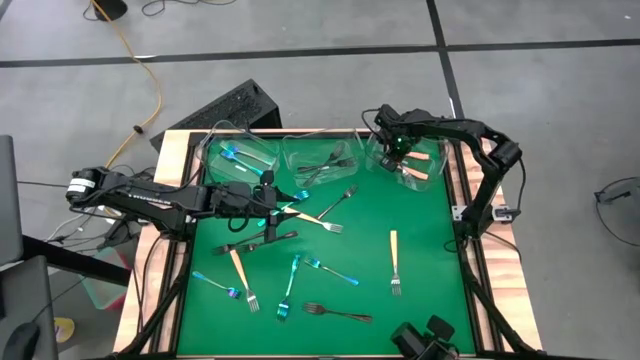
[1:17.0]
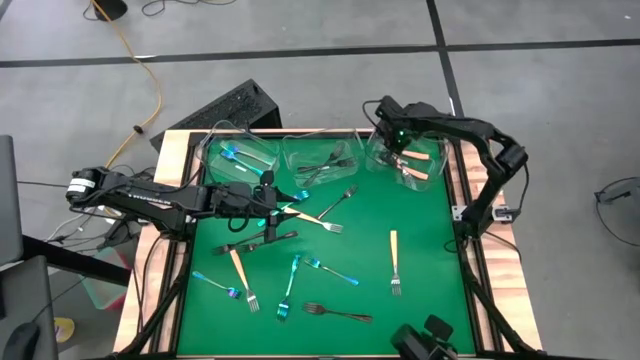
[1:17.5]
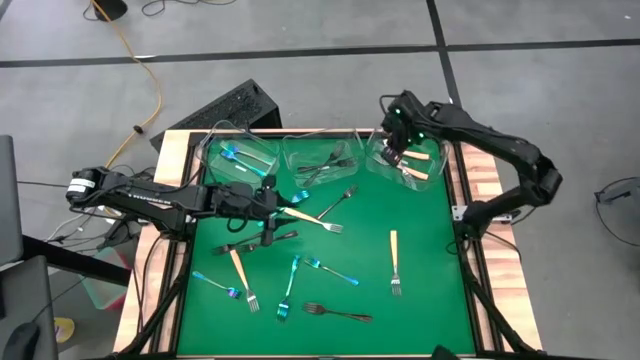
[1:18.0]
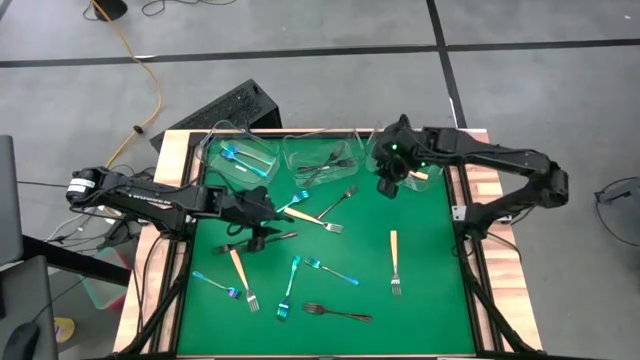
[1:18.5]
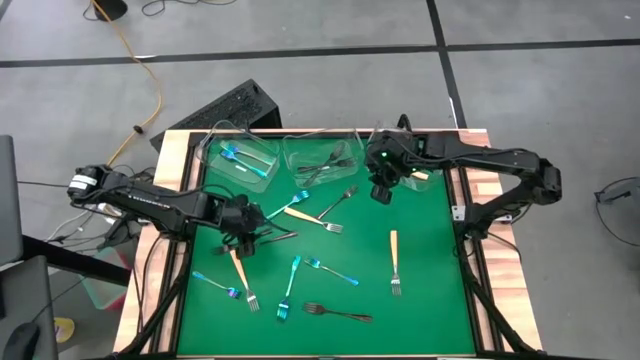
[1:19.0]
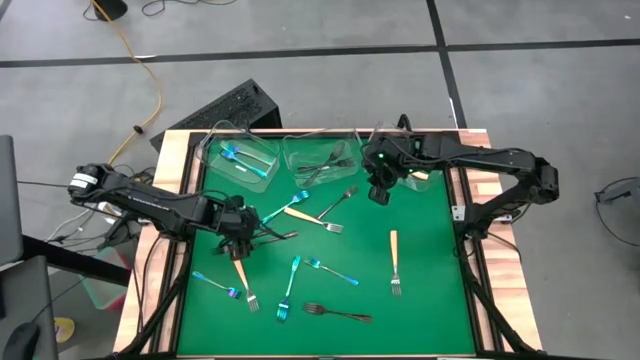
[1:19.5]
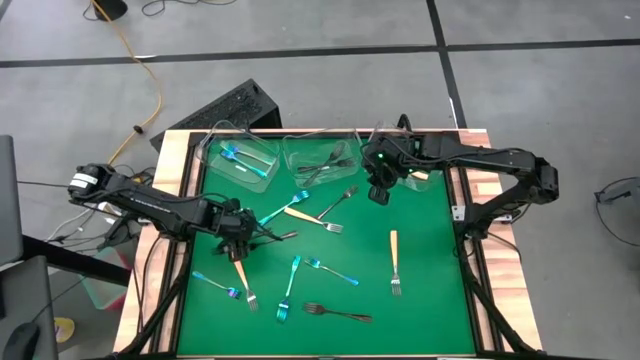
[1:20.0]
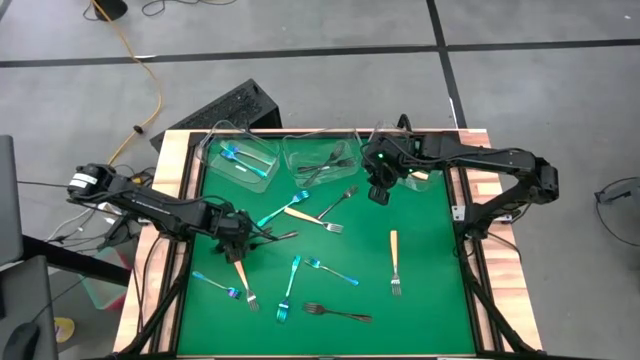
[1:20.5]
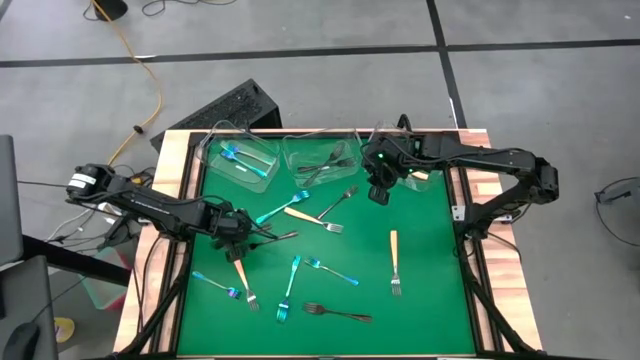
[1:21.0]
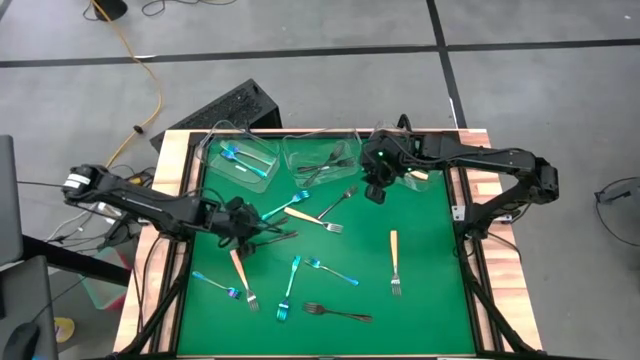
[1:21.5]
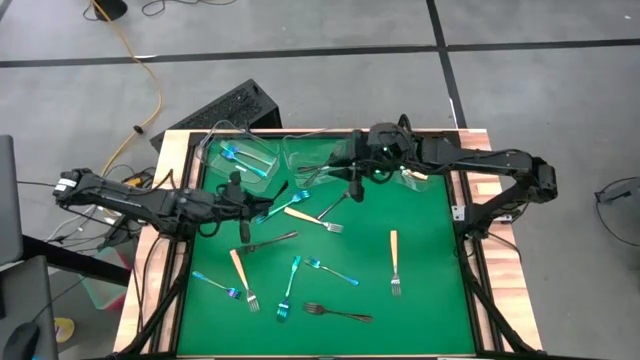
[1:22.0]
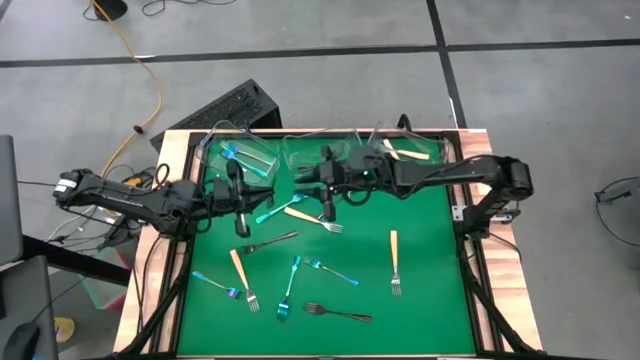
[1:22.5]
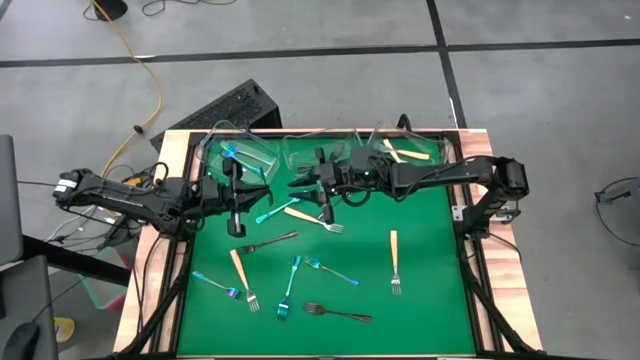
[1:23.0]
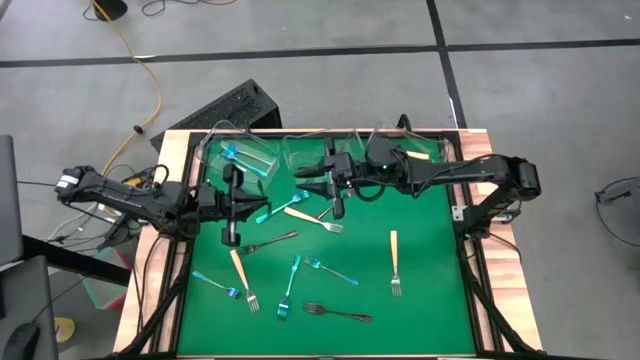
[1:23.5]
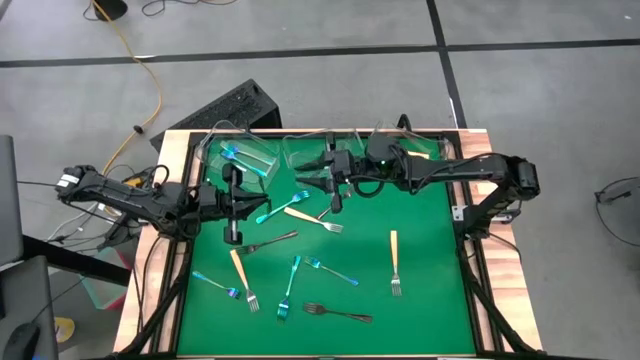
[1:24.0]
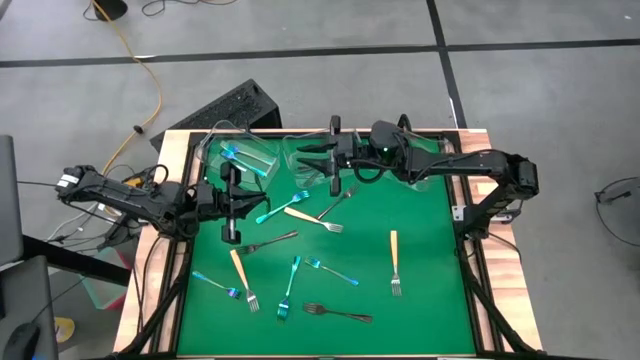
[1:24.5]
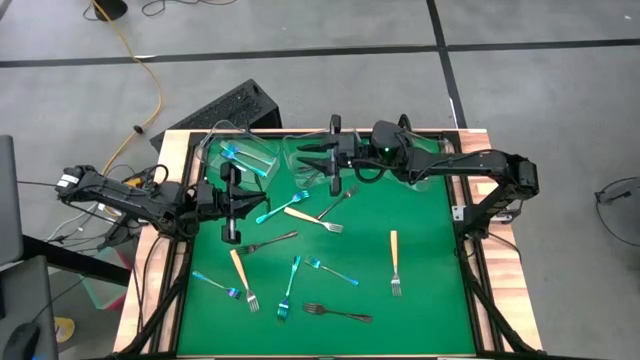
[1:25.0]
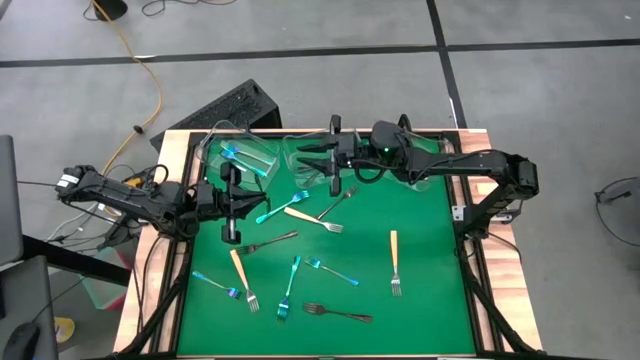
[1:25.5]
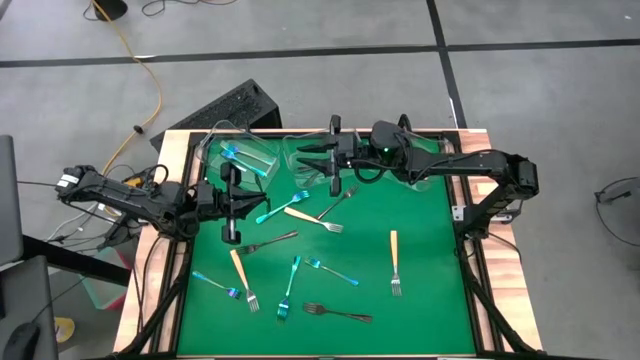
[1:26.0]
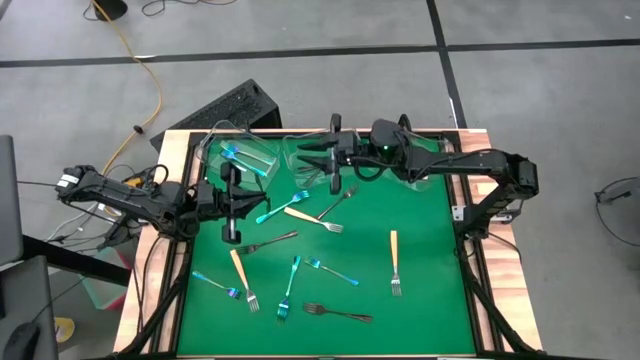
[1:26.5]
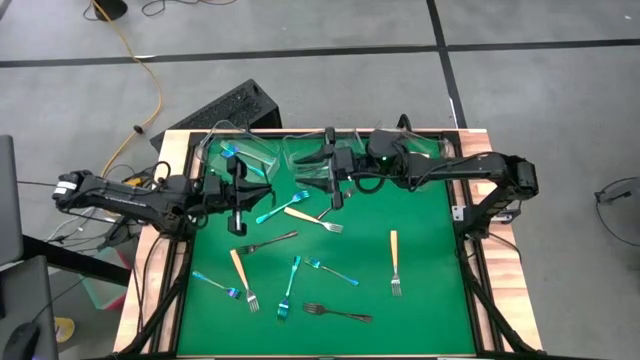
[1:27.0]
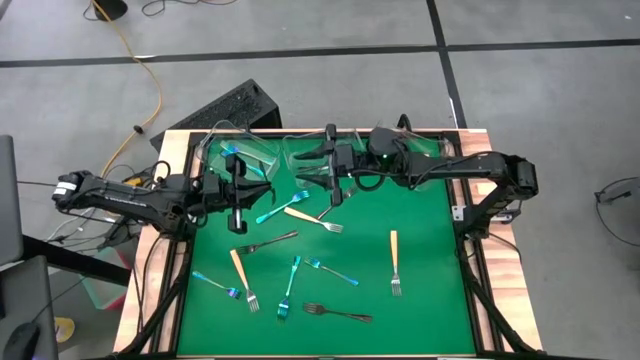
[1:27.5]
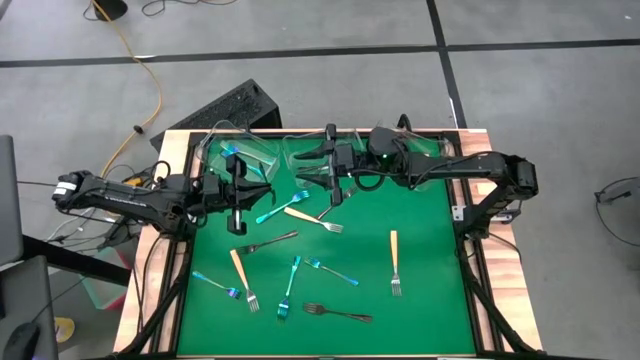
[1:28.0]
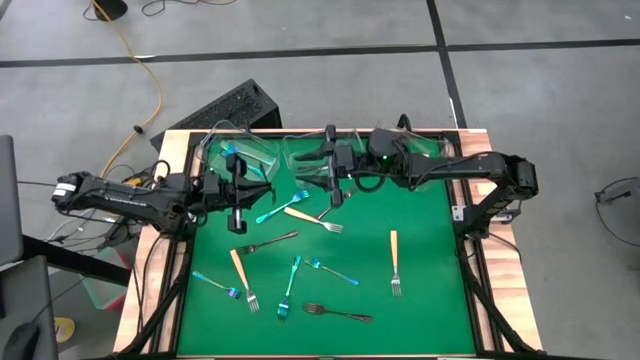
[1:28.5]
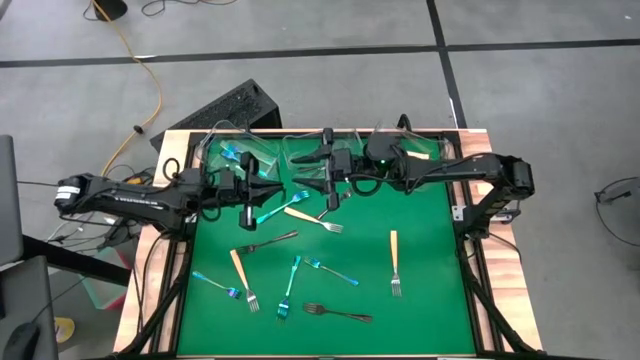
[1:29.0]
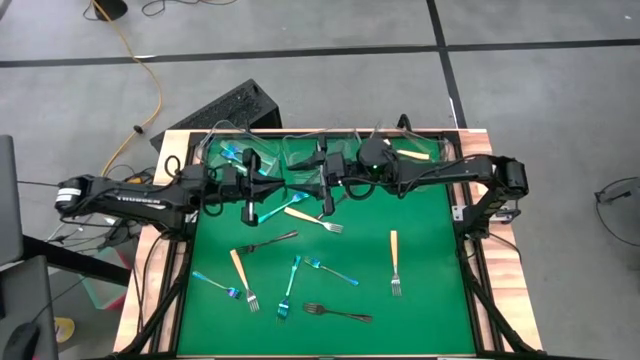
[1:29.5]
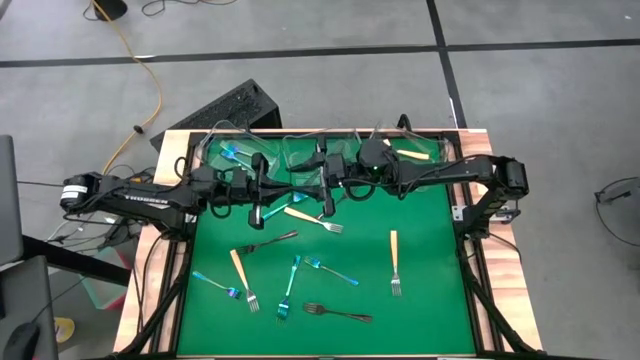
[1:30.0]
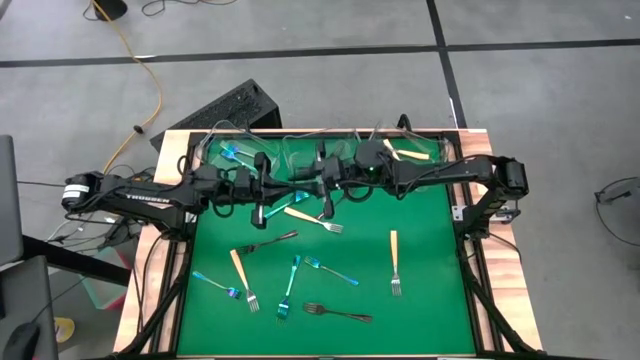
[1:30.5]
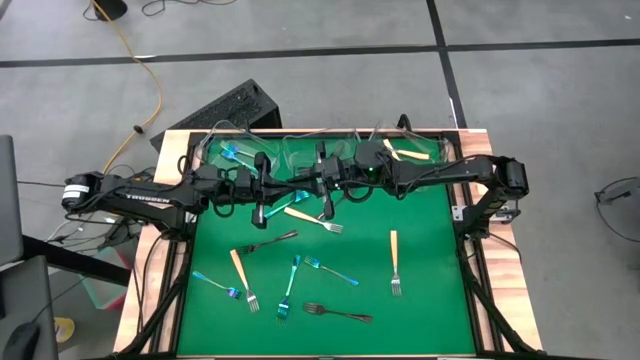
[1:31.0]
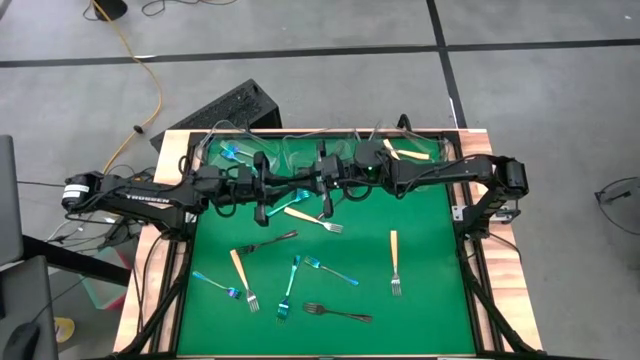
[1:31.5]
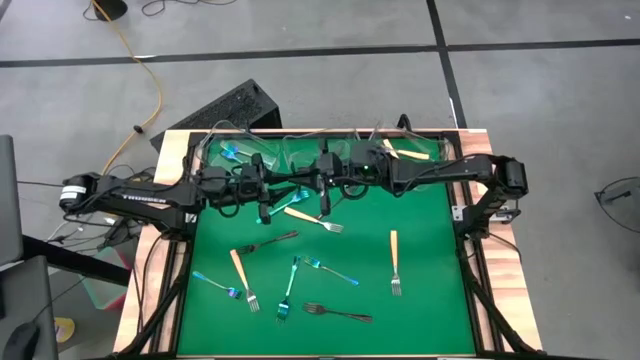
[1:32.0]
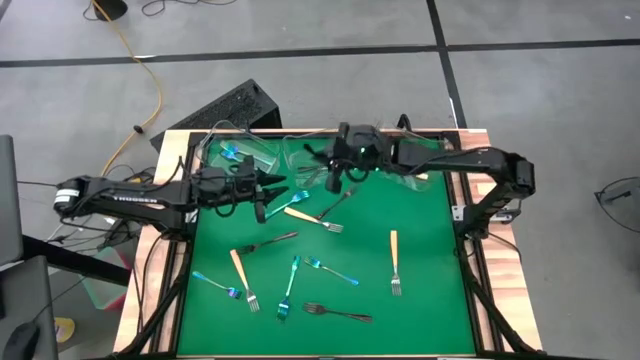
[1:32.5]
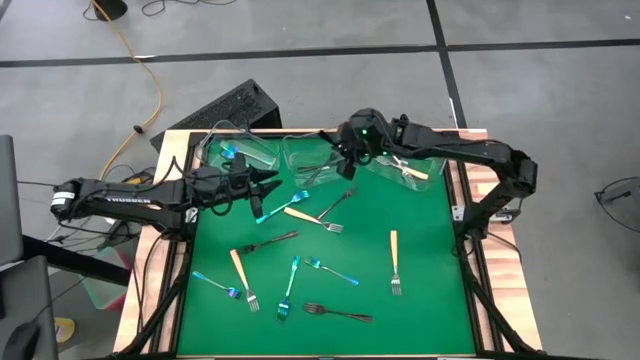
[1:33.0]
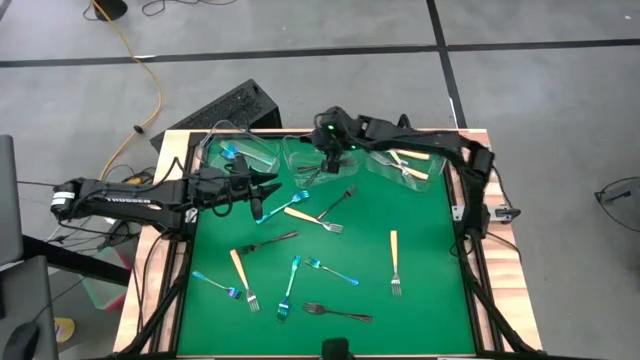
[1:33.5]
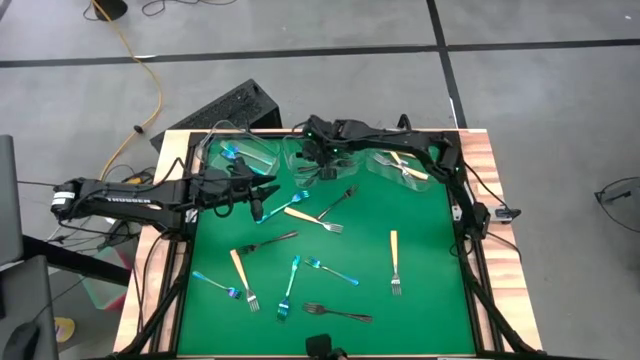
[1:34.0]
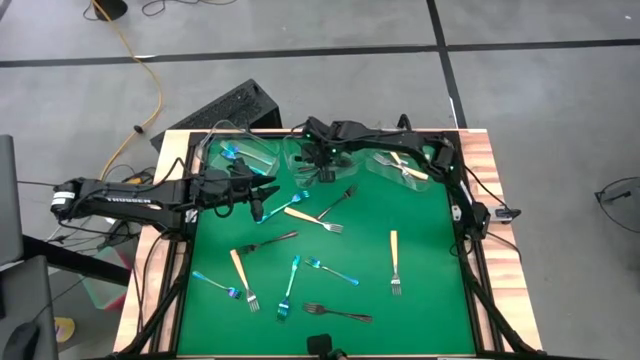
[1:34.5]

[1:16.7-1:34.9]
Task: Sort silverware by color (type)
Put the brown fork into the middle transparent bin

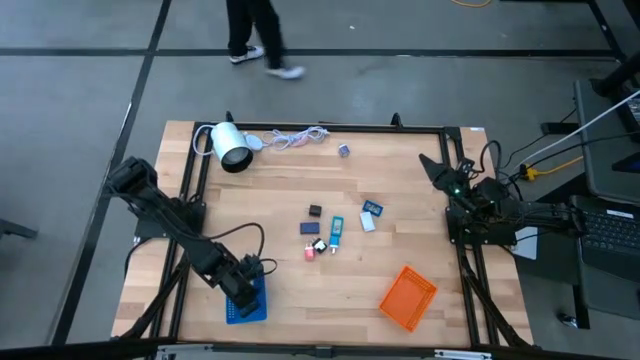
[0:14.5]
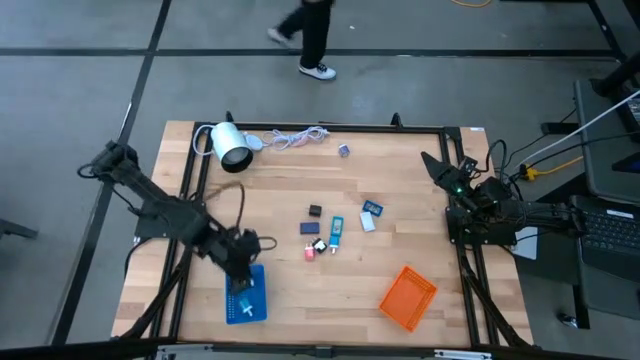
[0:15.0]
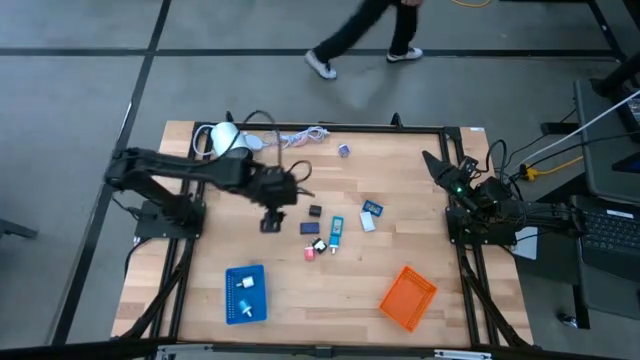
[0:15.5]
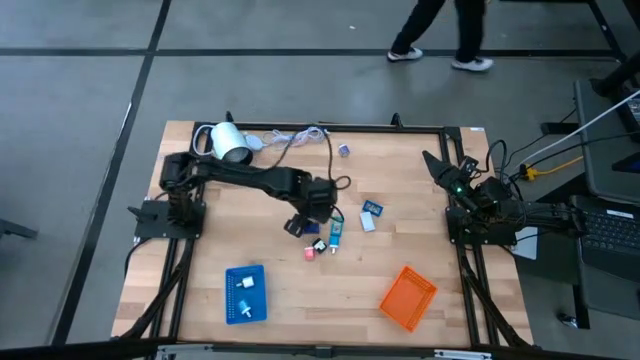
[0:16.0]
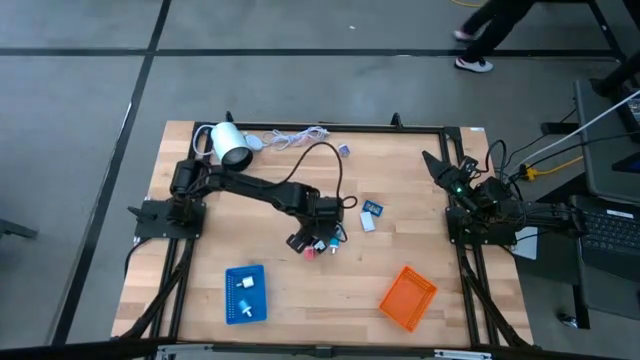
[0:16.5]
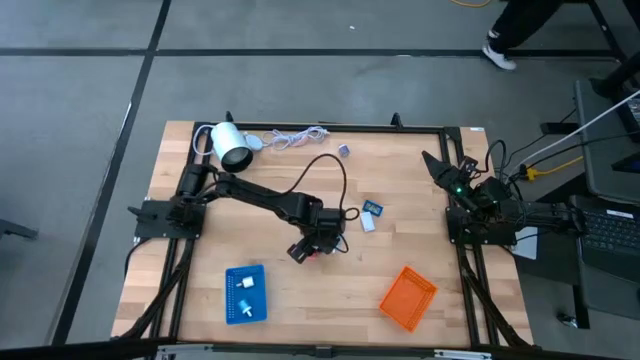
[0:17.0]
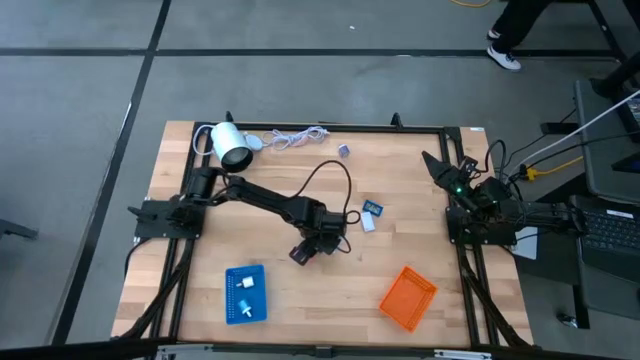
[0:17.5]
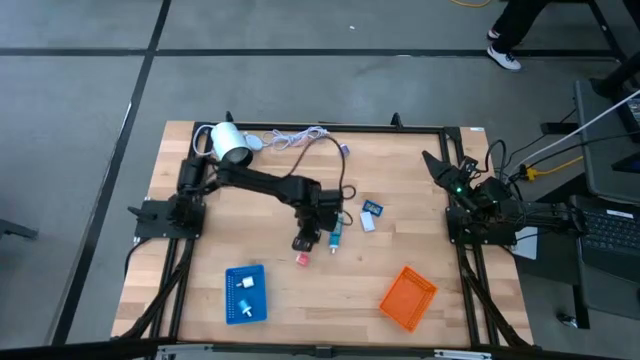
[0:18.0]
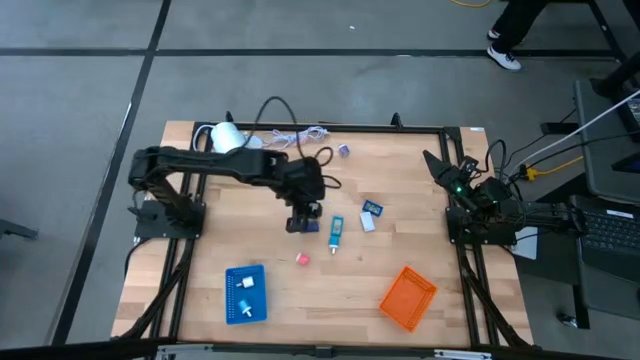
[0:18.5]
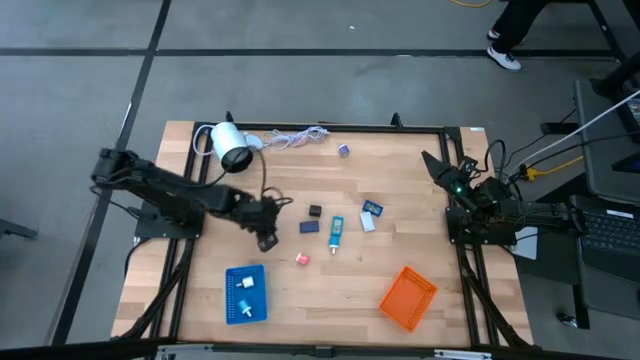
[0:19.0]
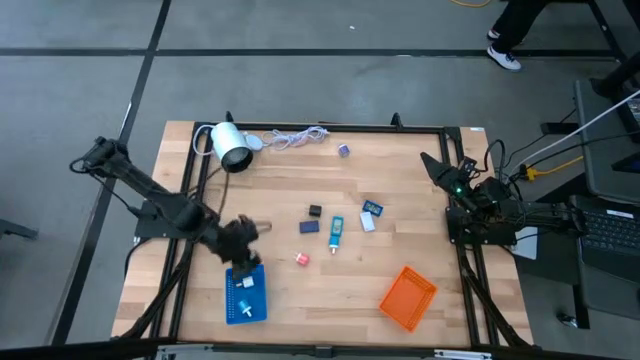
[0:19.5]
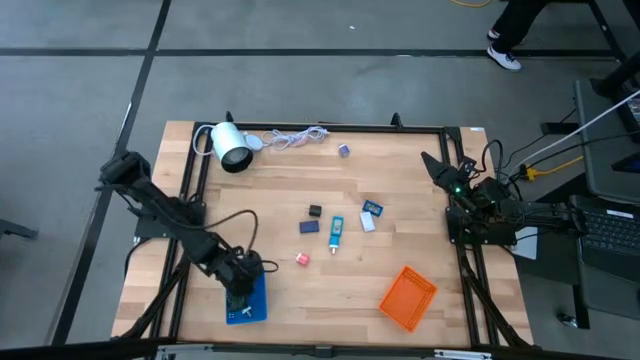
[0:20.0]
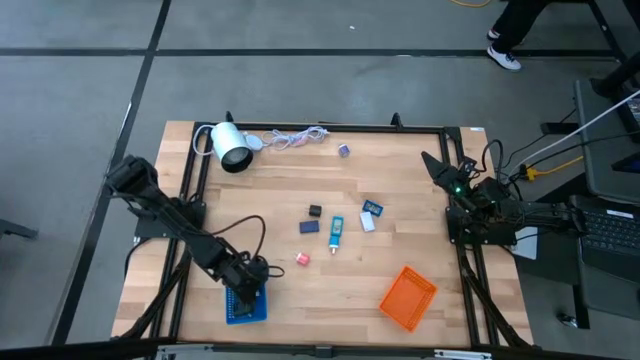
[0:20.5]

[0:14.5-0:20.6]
Task: Pick & Place Office items
Put the bottom black charger adapter into the blue basket
